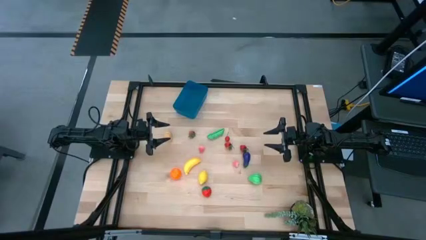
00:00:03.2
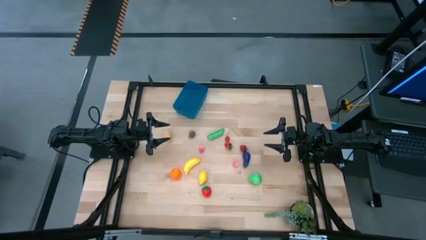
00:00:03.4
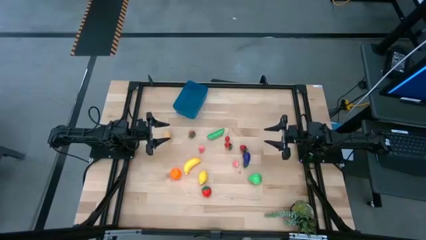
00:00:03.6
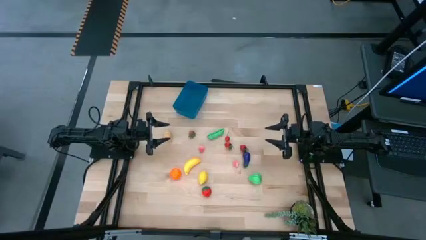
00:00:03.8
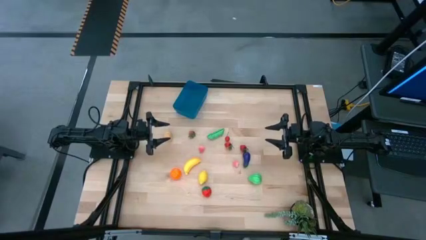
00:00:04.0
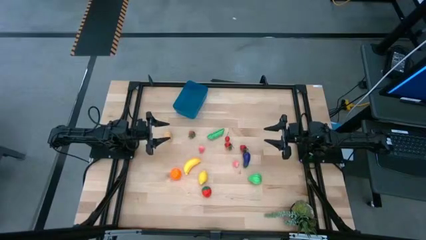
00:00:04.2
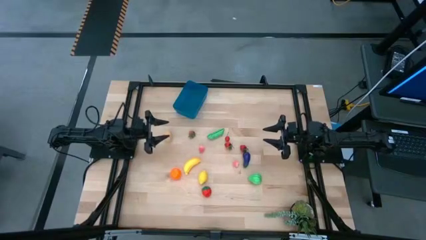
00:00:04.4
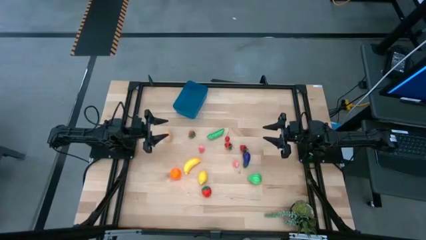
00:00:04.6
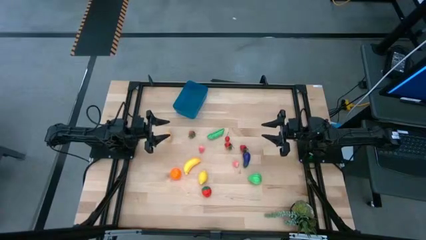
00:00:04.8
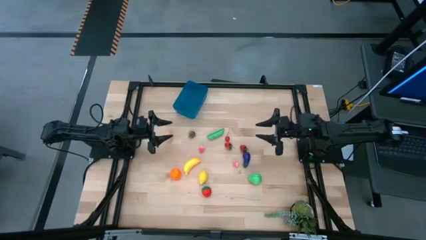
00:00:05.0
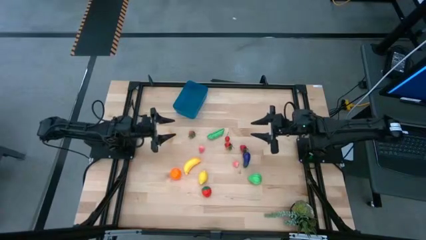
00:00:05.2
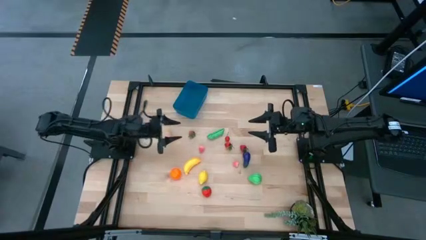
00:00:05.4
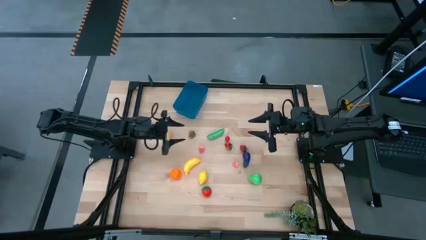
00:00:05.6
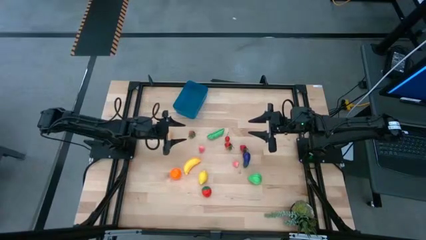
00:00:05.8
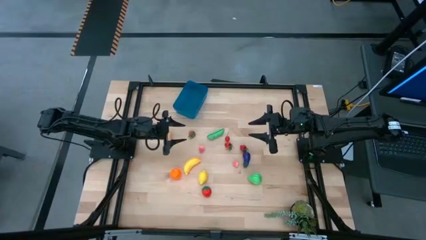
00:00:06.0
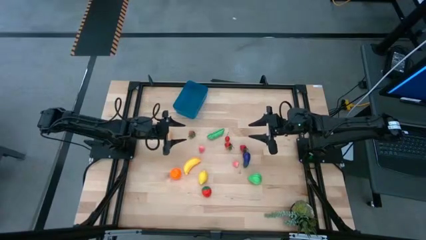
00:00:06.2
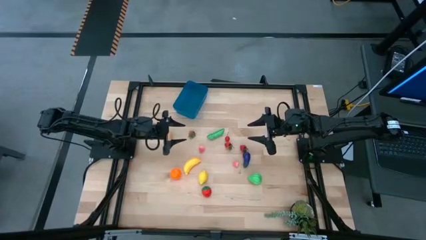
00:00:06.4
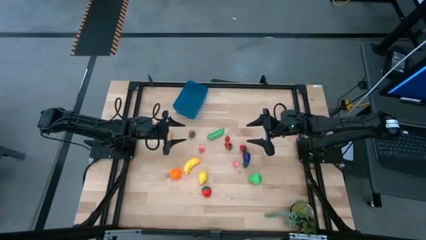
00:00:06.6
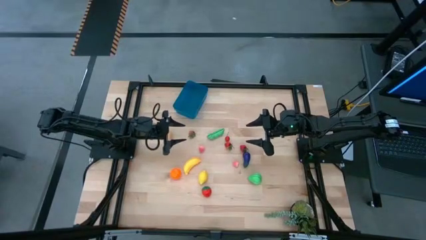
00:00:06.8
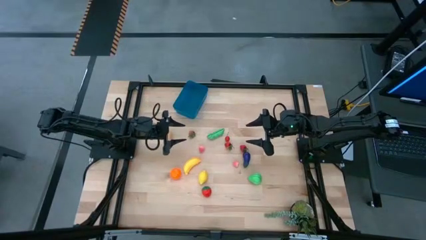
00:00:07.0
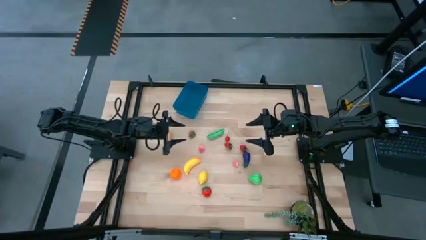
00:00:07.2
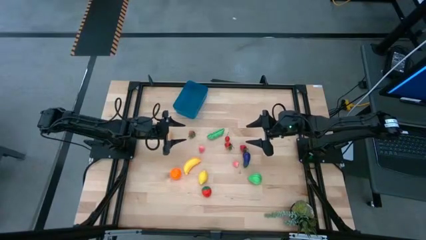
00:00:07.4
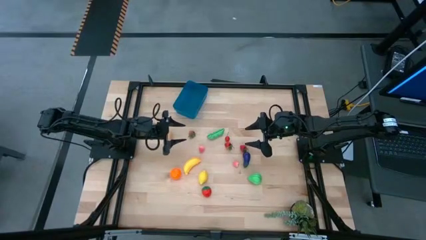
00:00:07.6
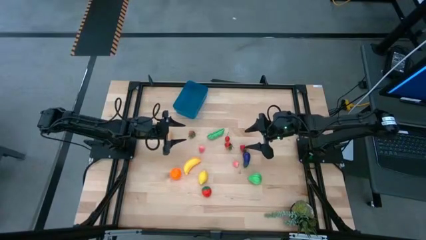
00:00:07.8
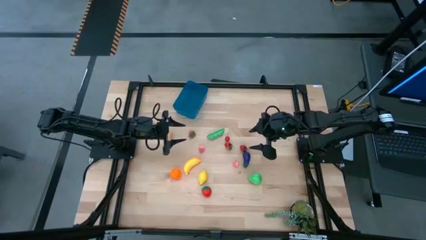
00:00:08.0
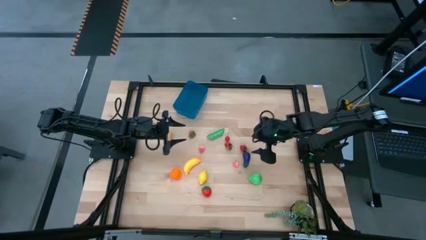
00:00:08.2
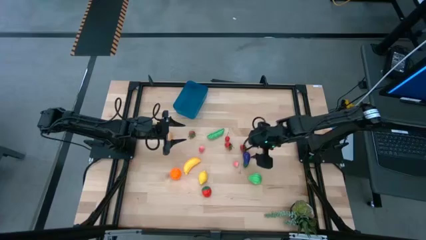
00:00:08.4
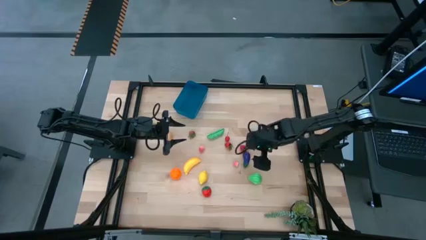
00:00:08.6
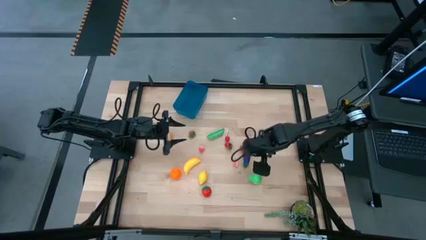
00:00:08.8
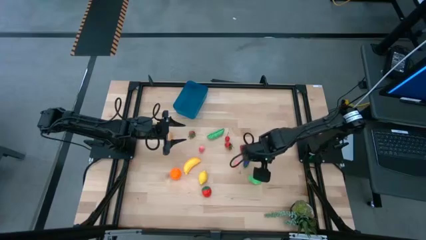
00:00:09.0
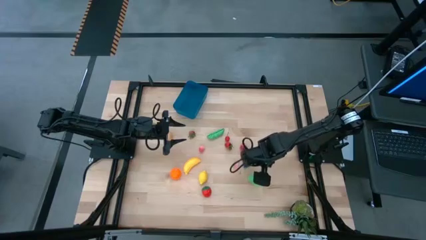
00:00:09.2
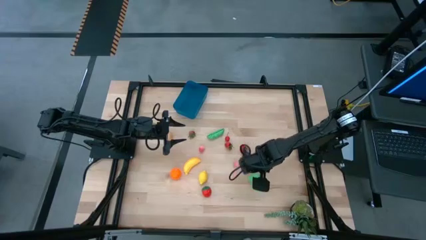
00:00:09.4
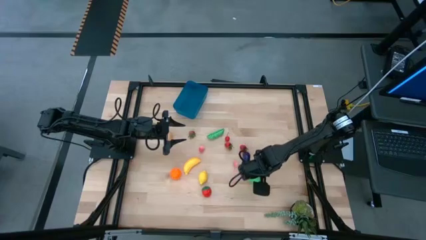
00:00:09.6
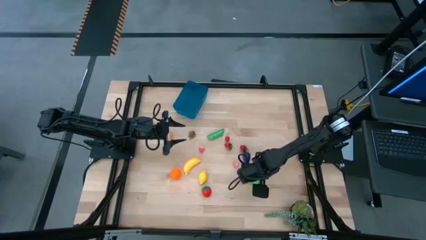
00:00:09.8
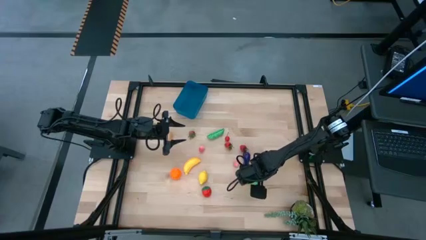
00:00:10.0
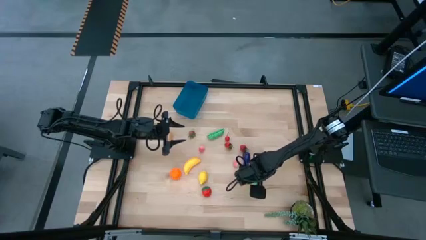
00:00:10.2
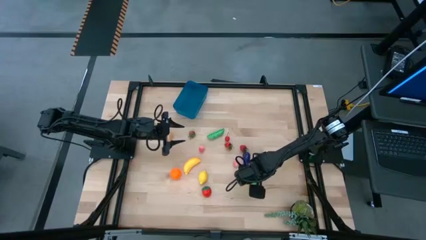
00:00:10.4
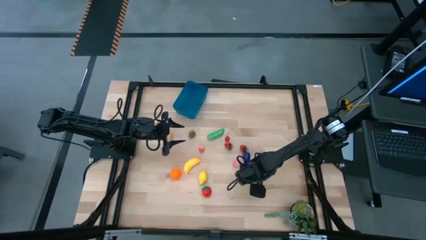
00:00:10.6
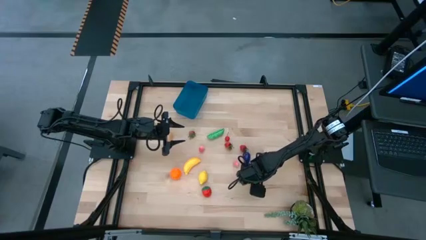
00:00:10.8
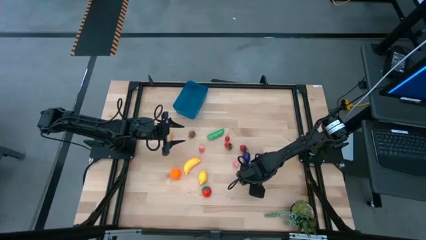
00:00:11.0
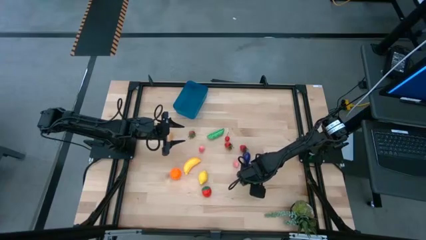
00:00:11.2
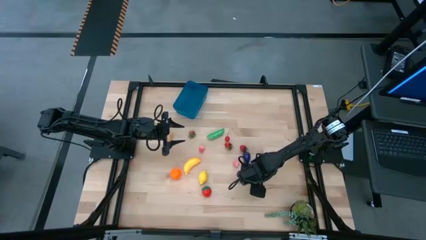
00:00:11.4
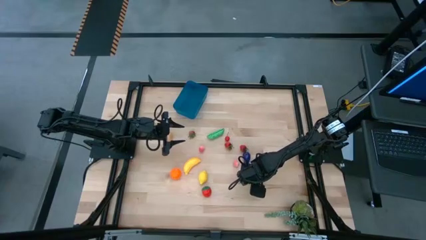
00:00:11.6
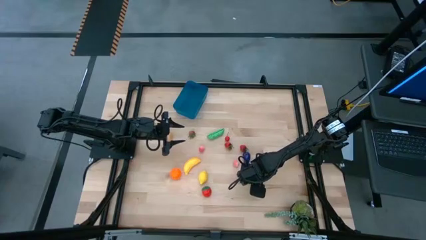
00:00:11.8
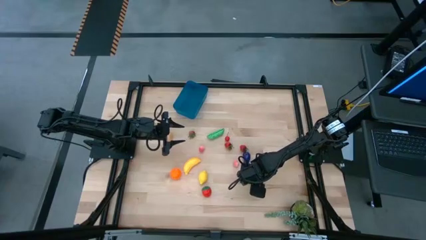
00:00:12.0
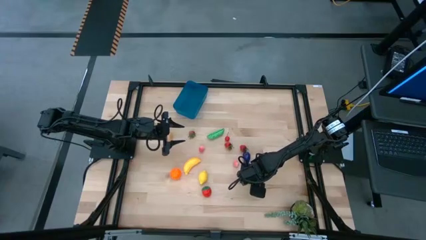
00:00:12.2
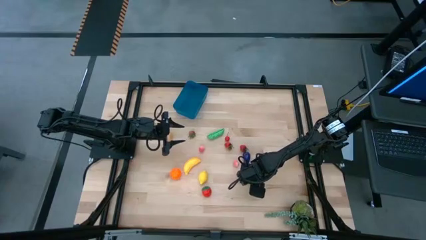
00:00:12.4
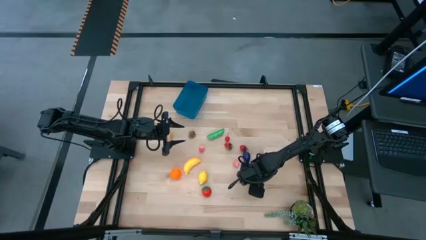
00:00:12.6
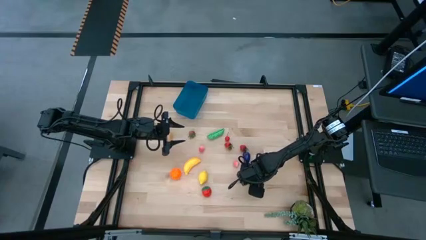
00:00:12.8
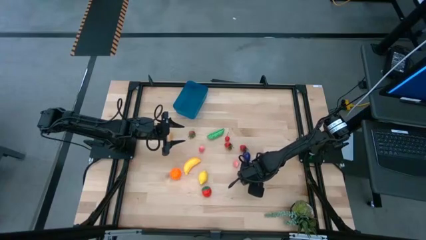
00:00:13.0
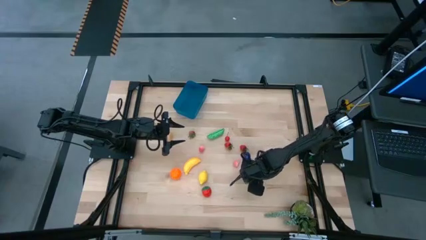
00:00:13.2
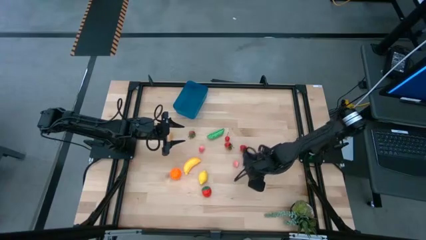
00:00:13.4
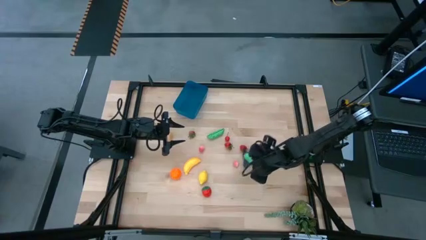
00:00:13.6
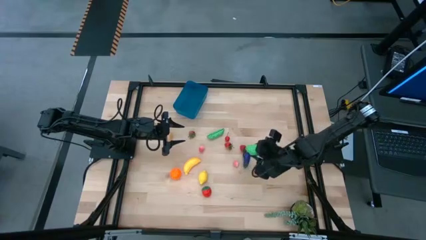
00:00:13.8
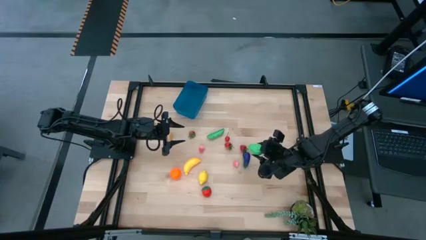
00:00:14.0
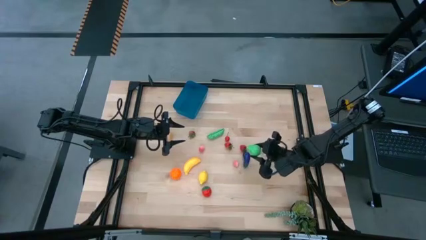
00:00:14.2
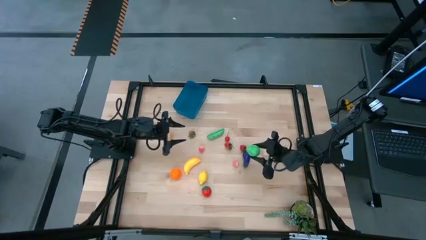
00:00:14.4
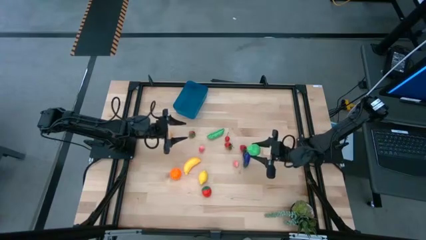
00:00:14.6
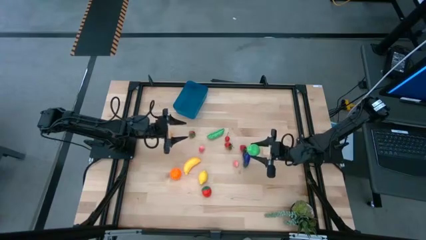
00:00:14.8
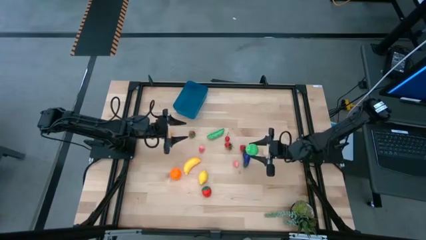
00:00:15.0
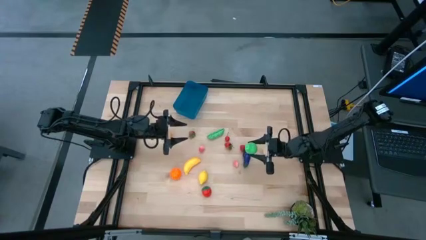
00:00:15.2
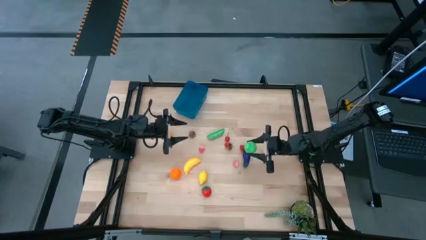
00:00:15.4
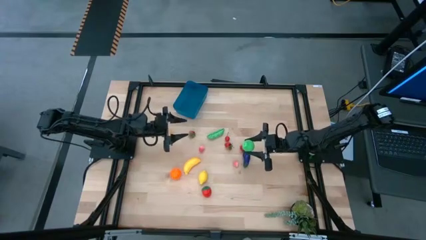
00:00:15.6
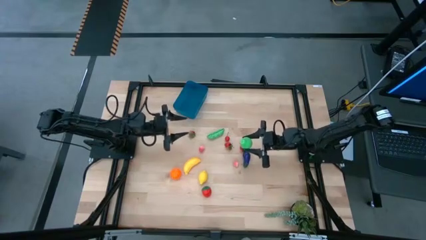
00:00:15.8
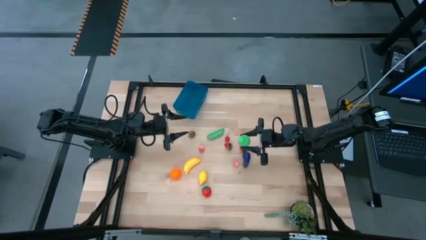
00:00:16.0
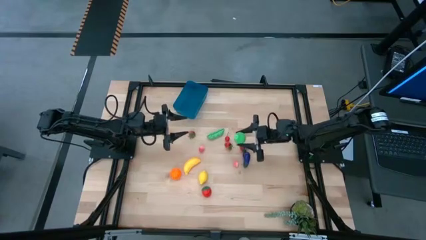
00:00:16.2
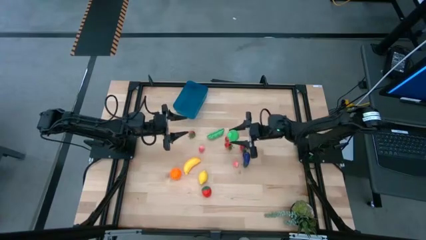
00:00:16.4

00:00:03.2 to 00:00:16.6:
Task: Pick and placing Produce into tupperware
Put the green pear into the blue bin
